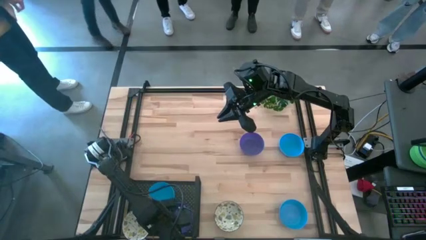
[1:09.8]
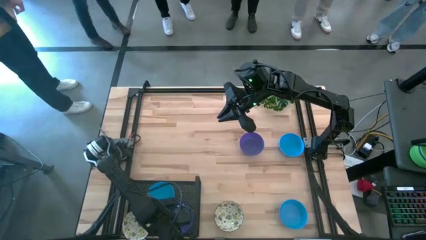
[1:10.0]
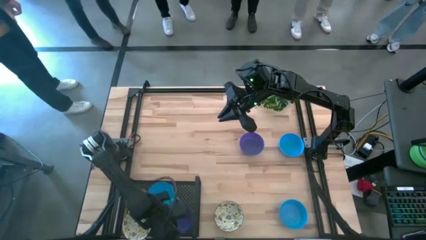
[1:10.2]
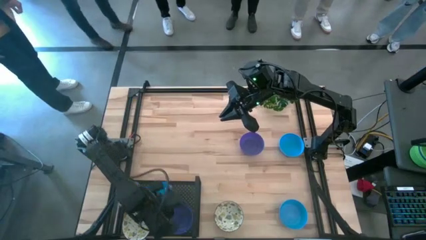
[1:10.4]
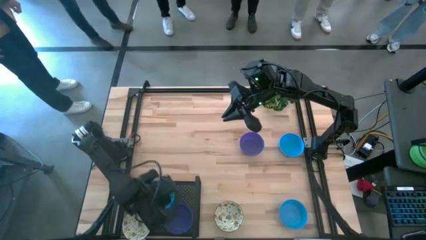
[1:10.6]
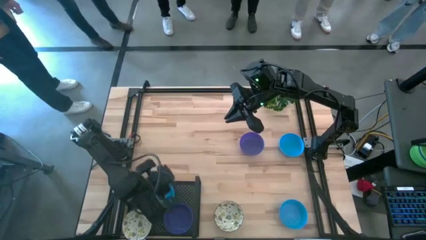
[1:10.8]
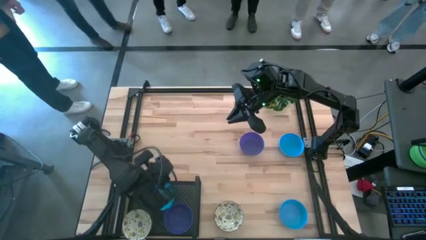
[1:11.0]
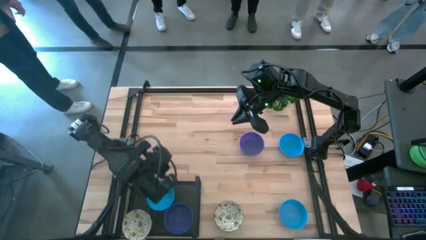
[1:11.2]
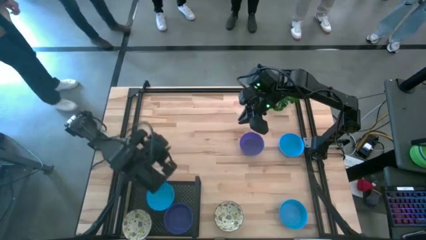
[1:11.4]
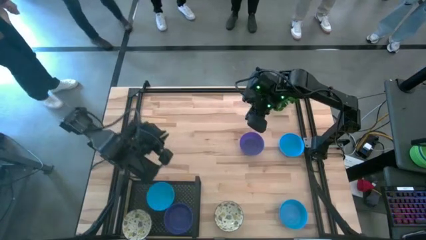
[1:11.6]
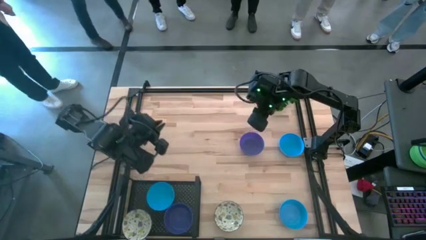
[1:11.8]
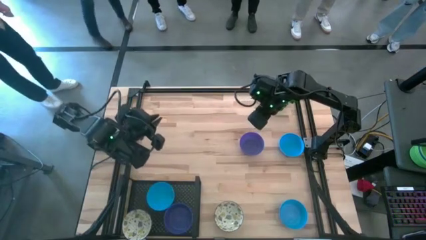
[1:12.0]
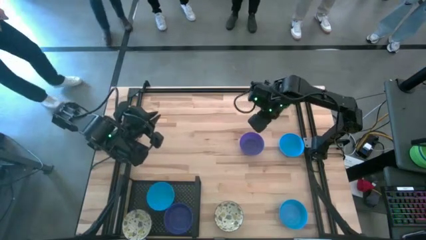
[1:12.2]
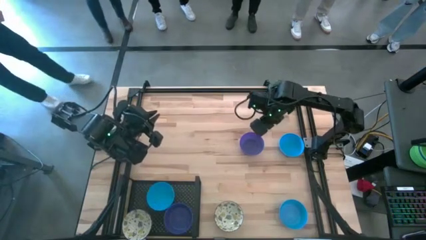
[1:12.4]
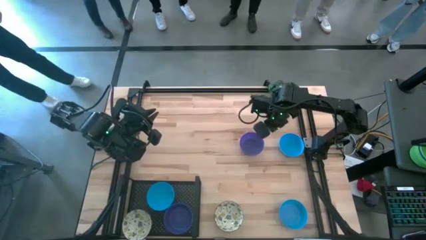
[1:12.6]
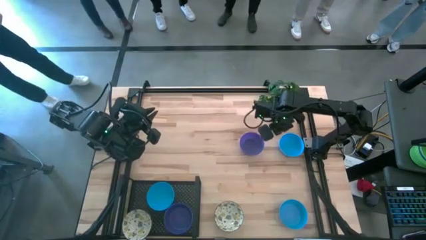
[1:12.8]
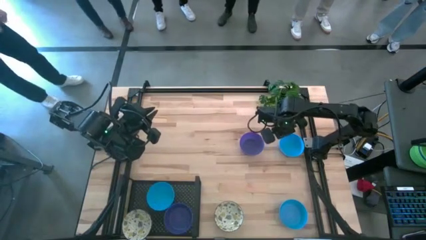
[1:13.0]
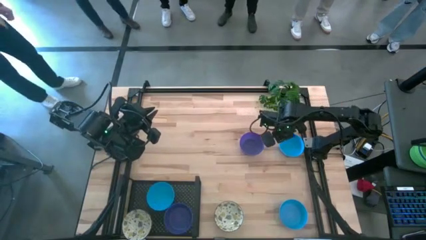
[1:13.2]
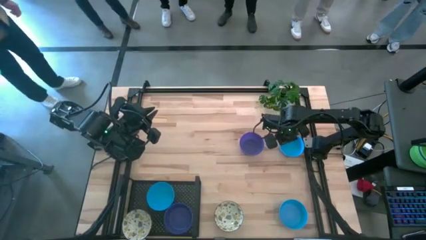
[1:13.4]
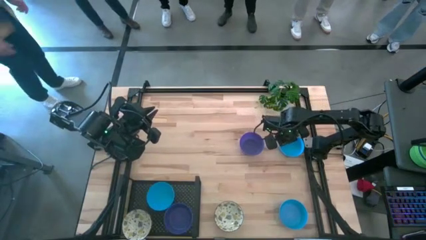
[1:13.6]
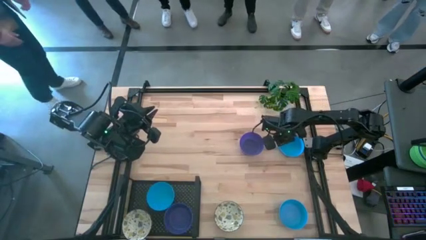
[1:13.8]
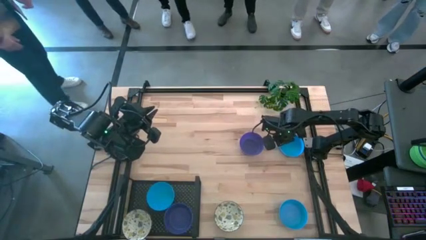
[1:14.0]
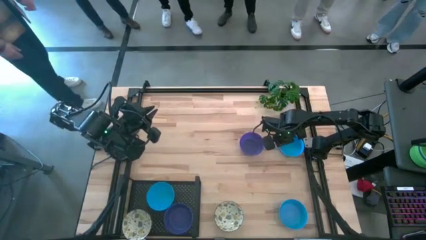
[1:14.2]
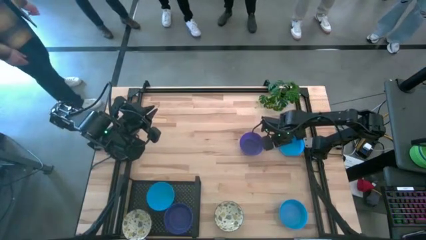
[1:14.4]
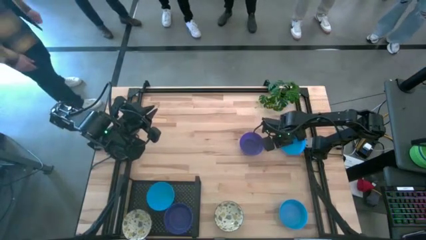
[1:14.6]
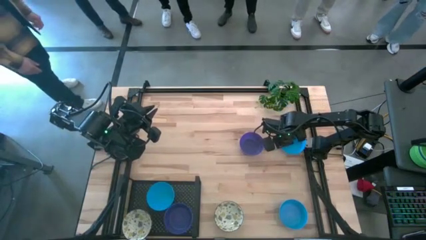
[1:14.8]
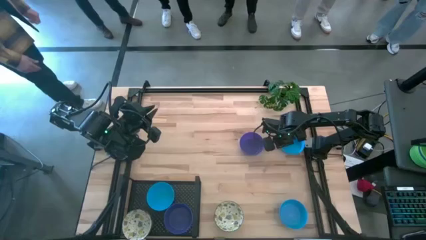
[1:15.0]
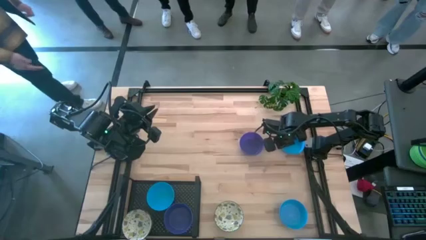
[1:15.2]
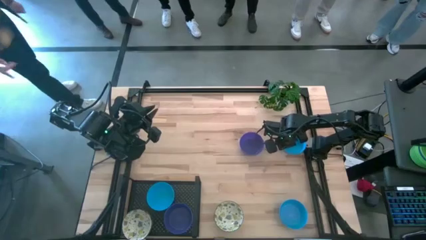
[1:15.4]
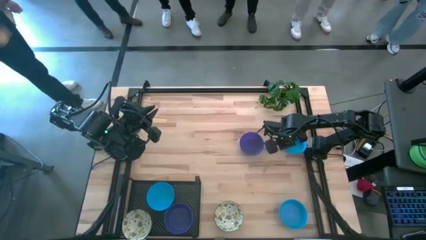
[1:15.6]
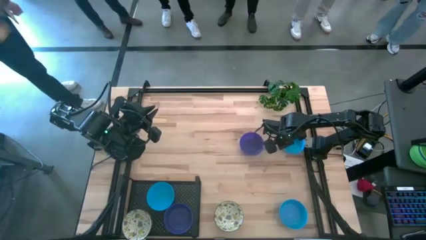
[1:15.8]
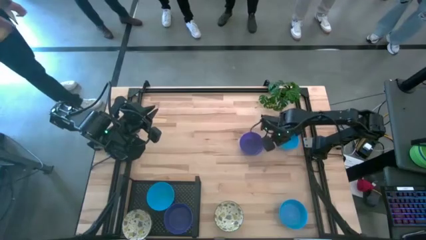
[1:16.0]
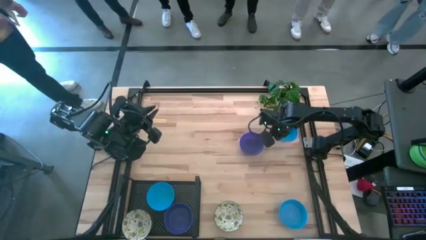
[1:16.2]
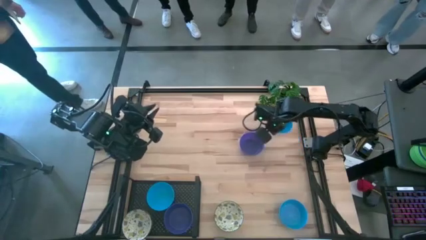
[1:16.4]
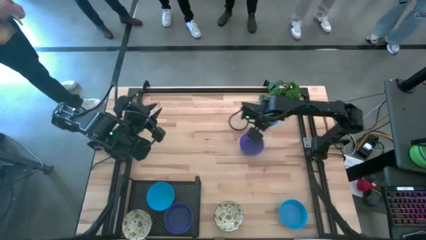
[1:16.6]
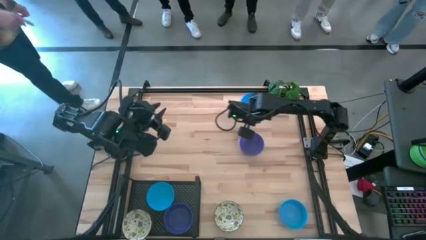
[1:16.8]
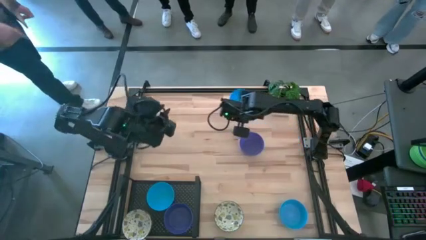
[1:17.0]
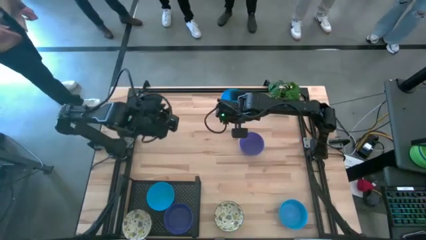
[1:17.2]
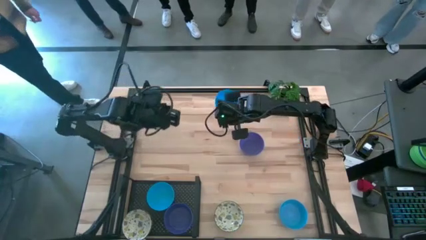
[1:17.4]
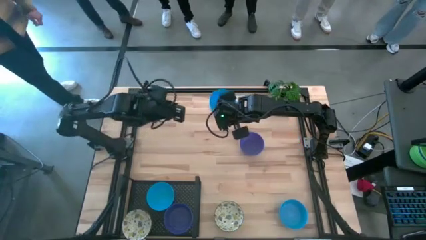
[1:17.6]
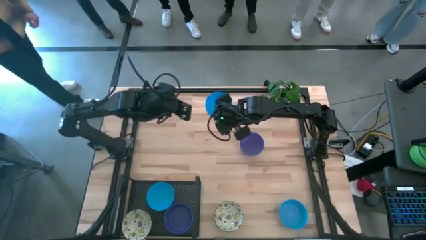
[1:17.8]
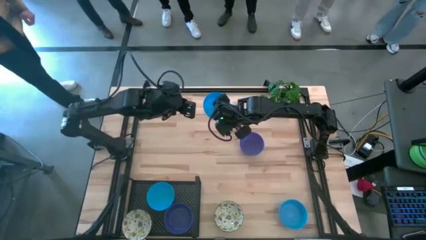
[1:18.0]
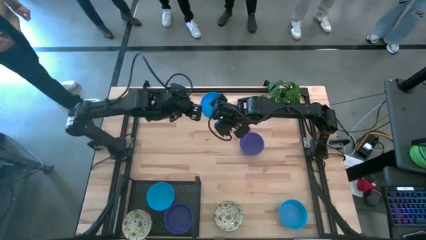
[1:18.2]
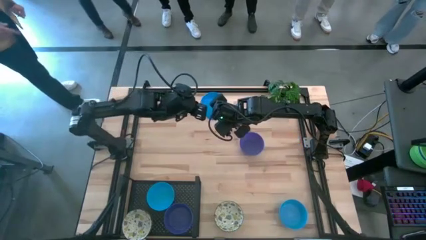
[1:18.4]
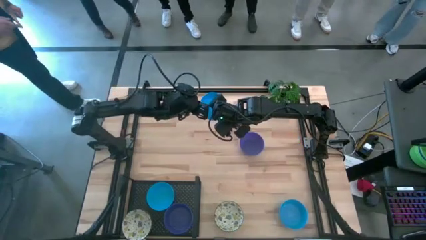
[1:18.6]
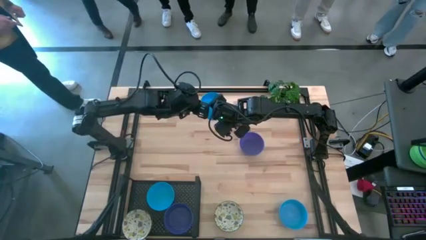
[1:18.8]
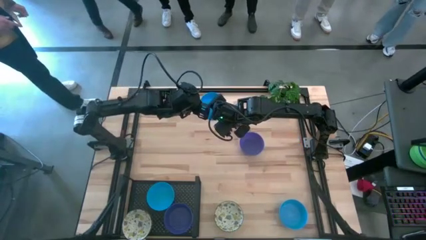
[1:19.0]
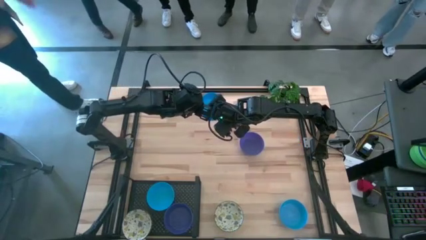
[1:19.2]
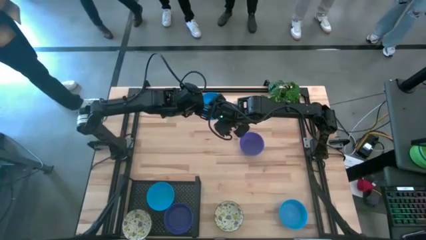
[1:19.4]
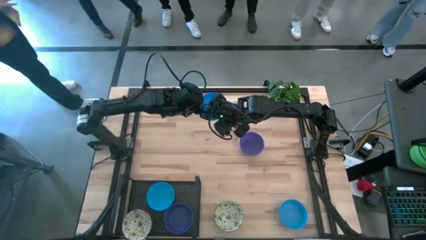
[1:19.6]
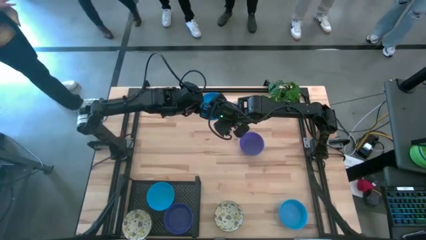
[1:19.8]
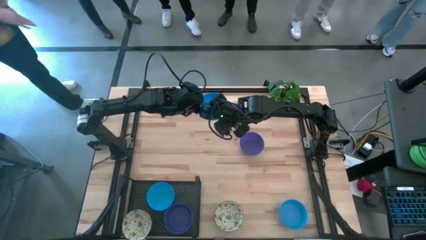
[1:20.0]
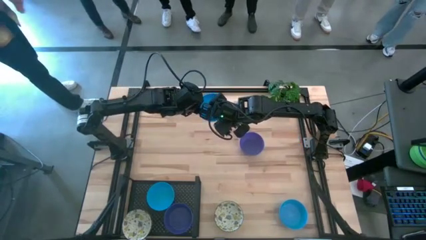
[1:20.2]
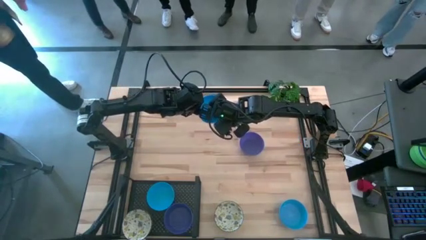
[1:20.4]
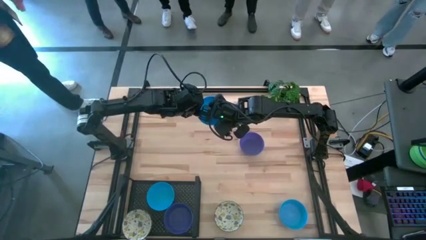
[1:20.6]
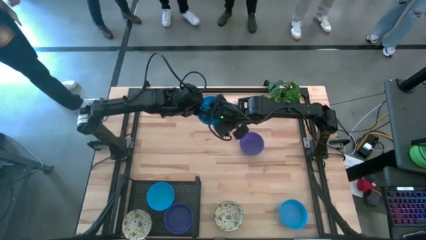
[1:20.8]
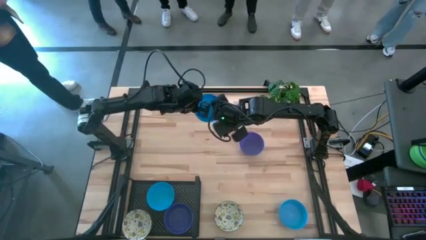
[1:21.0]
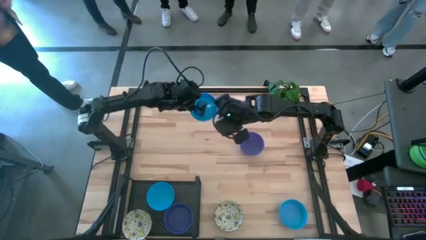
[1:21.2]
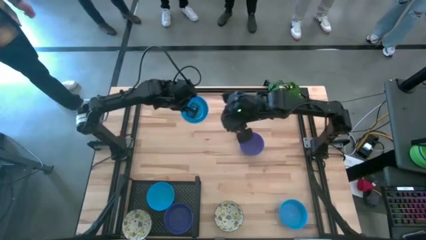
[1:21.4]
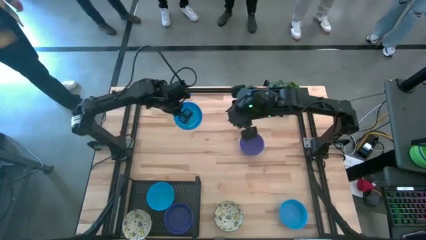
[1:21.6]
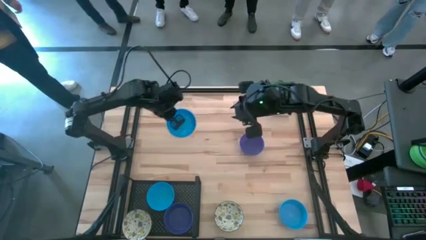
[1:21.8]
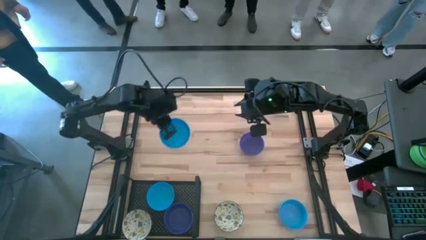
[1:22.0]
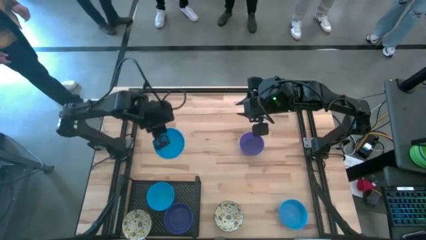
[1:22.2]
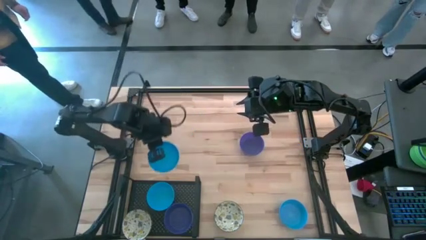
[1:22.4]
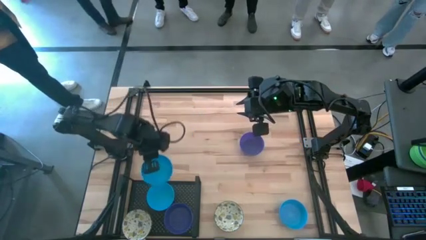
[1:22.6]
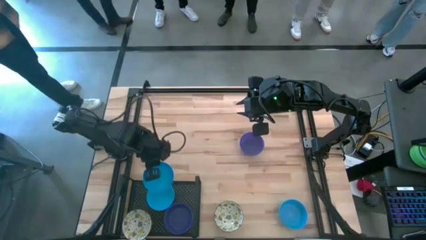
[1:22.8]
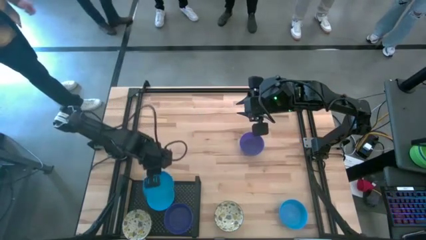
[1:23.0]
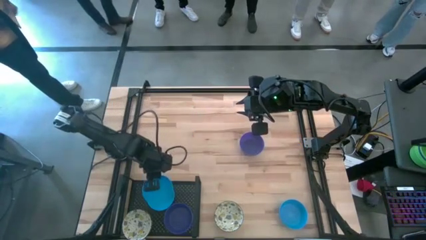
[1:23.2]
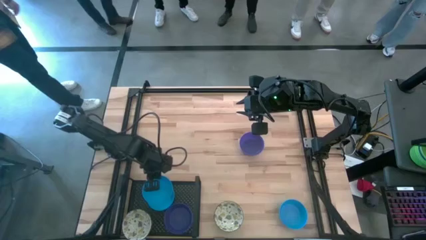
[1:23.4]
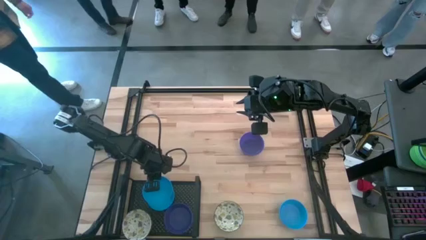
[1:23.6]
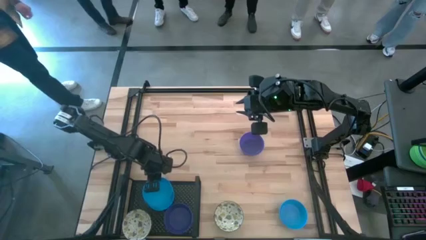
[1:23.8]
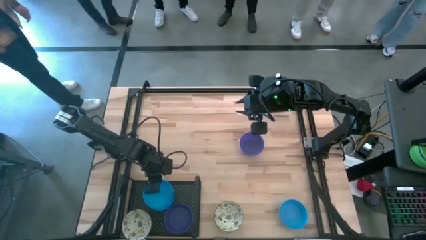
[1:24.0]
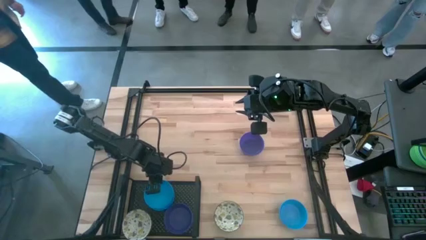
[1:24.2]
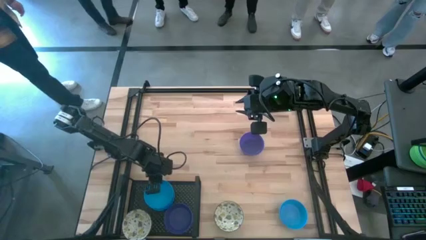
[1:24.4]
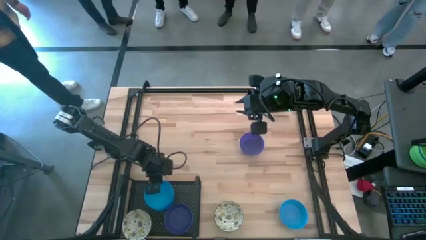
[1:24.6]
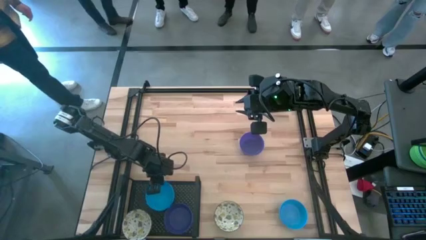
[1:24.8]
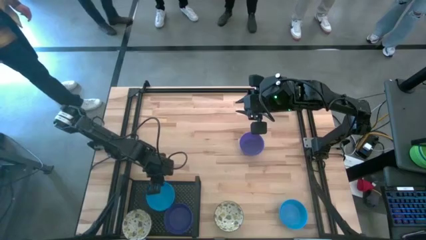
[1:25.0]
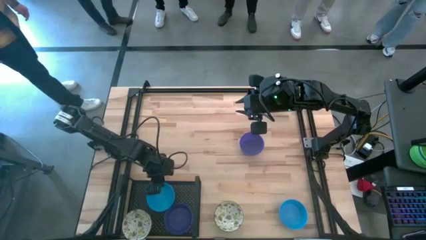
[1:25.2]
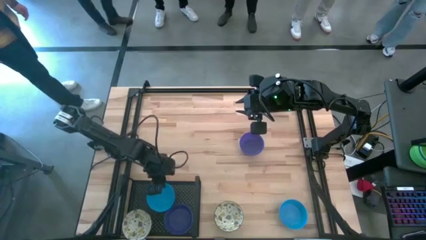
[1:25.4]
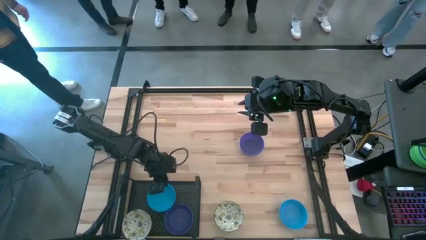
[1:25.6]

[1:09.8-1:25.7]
Task: Pick & Place Mini bowls
Stack the top blue bowl on the blue bowl on the shelf
